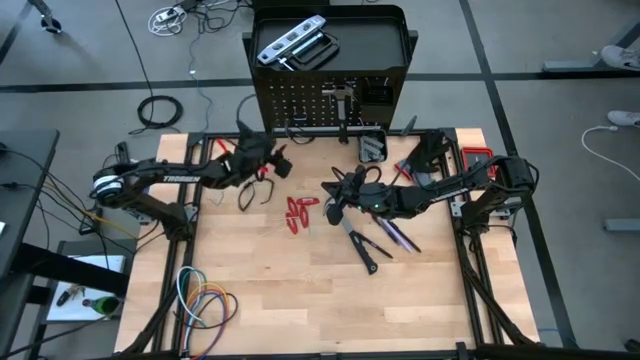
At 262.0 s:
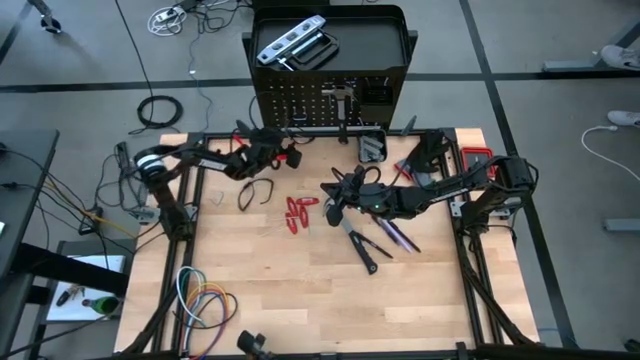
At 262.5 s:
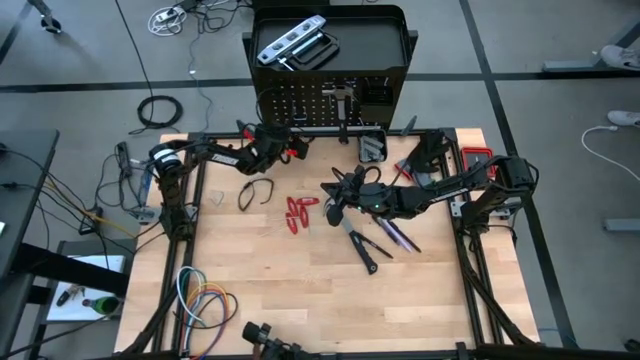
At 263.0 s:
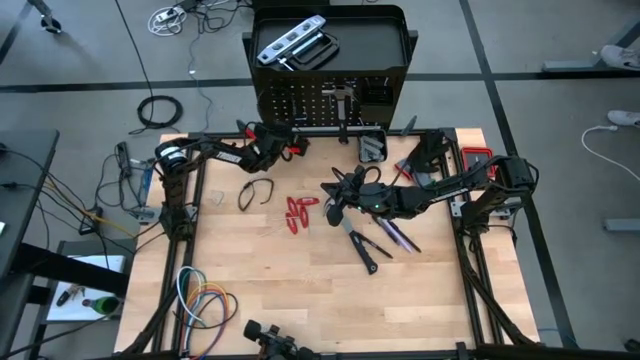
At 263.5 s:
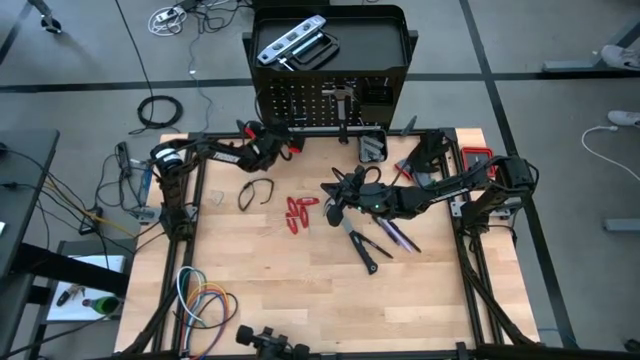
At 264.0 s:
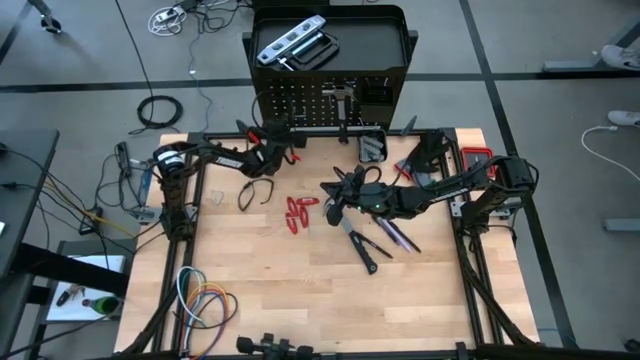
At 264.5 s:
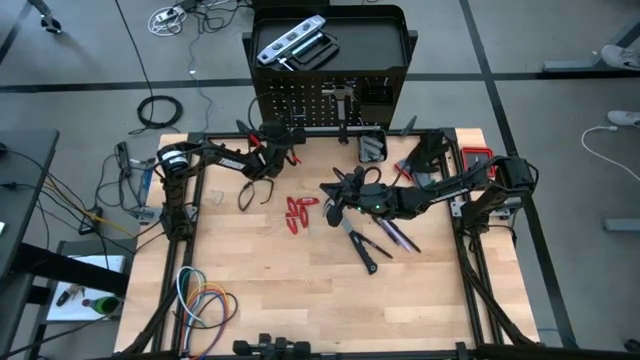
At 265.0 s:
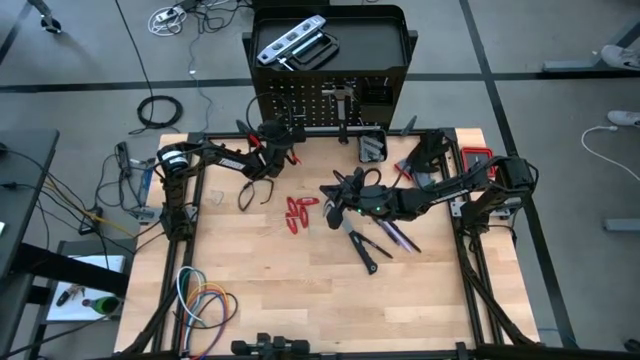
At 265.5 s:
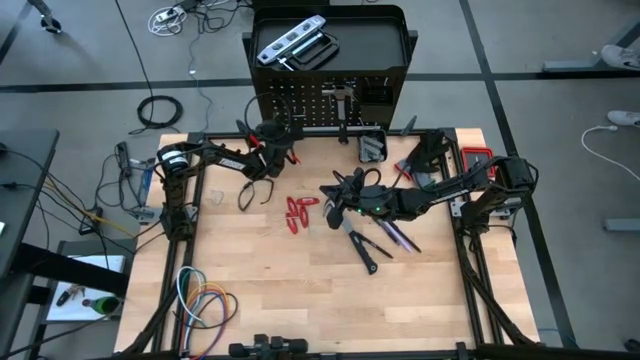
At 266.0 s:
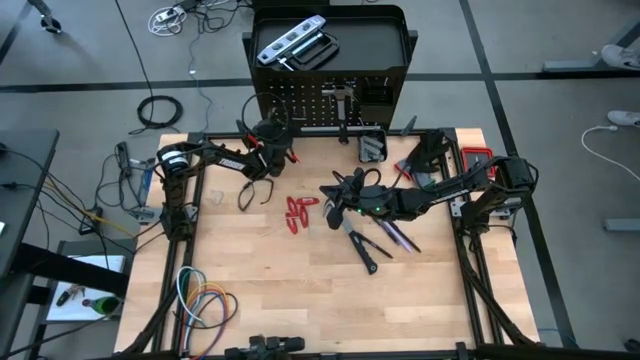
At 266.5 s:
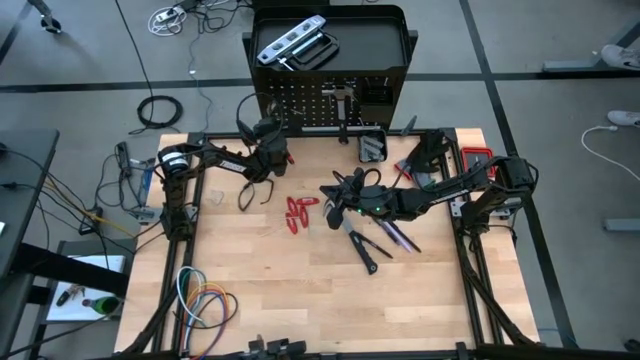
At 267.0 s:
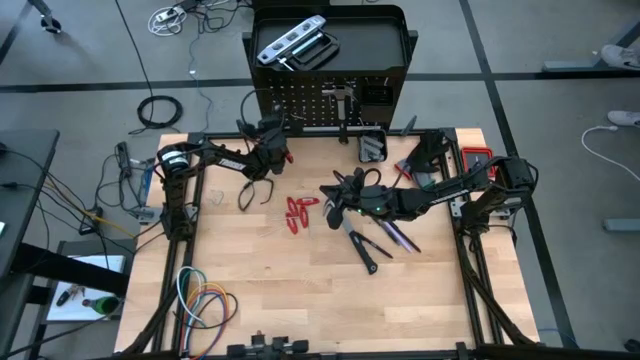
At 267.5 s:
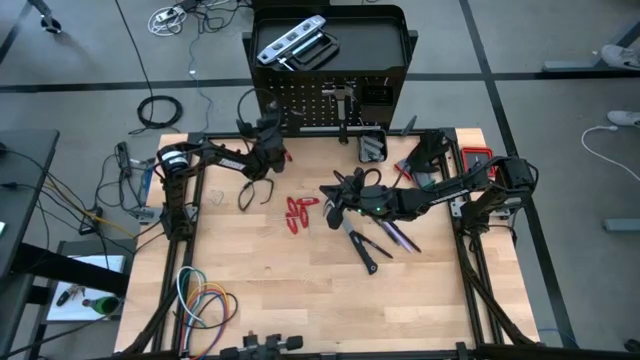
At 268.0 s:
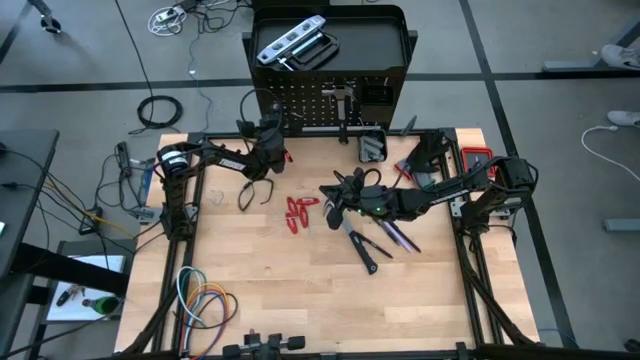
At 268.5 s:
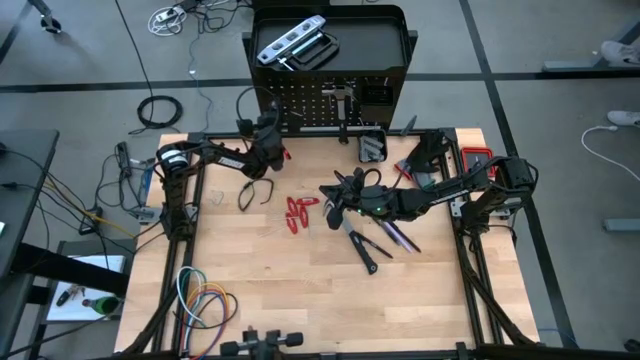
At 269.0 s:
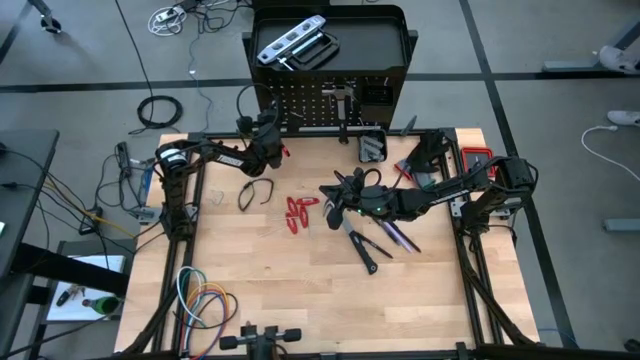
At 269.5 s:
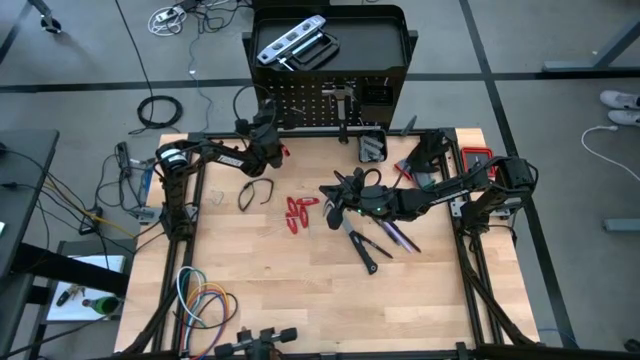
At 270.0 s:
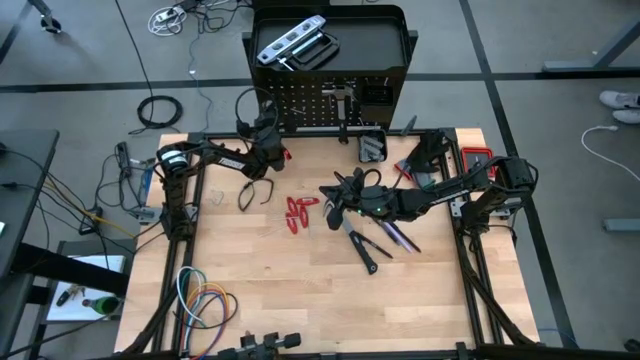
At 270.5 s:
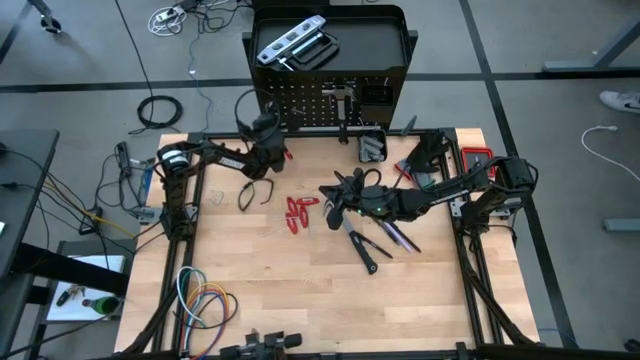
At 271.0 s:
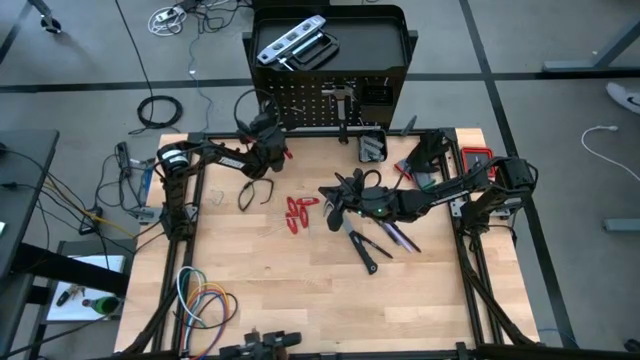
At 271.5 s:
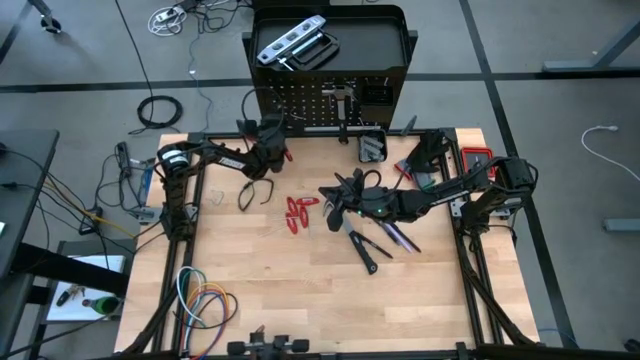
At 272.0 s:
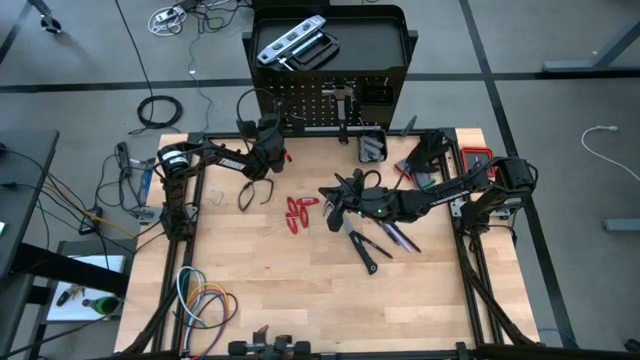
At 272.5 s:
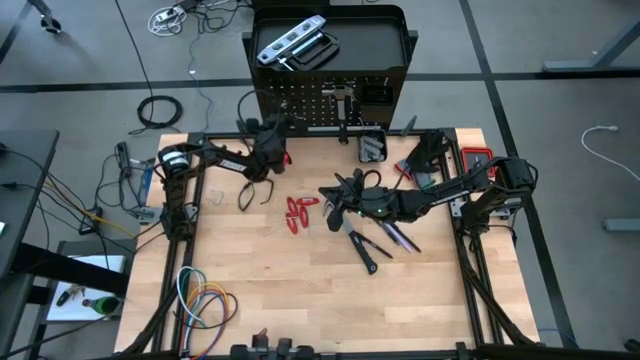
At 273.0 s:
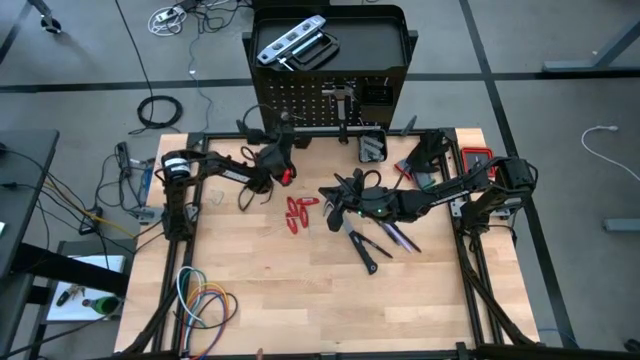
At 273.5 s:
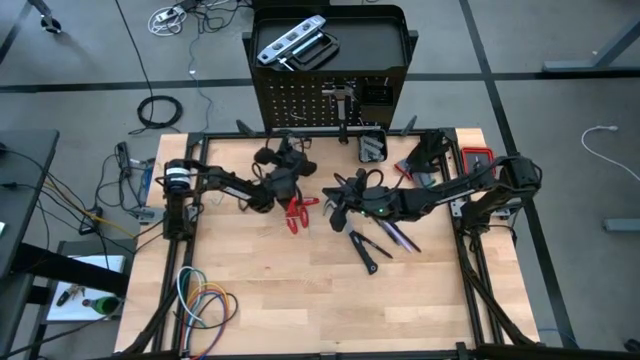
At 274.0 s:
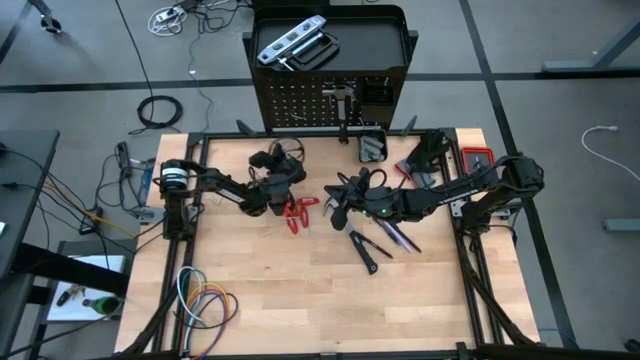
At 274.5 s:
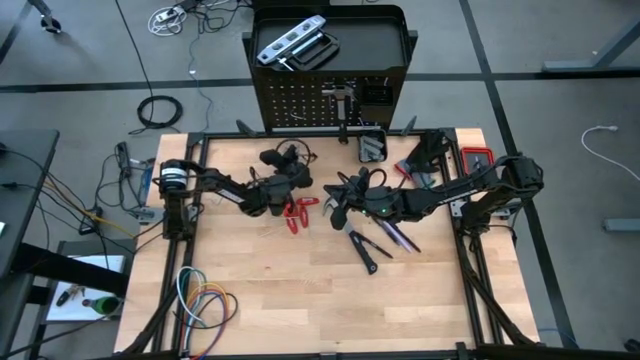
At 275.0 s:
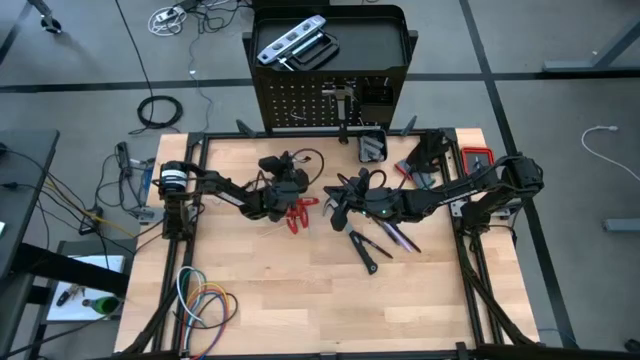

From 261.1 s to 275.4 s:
Task: Hang tools onto peg board
Remove the glasses from the peg board

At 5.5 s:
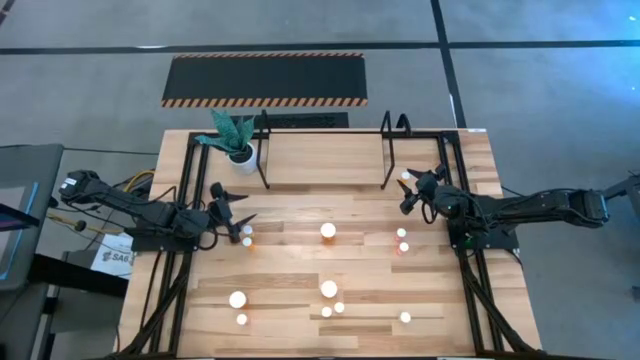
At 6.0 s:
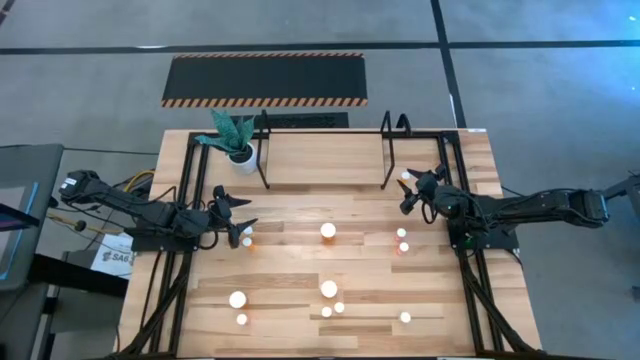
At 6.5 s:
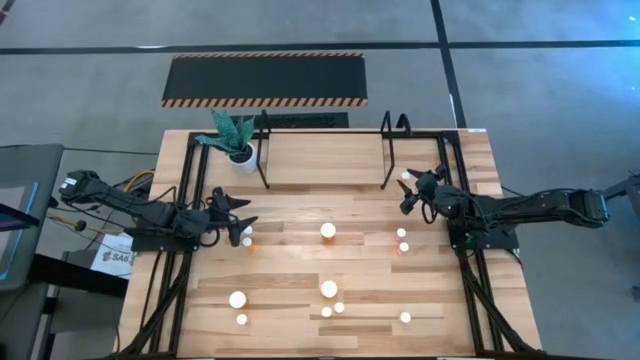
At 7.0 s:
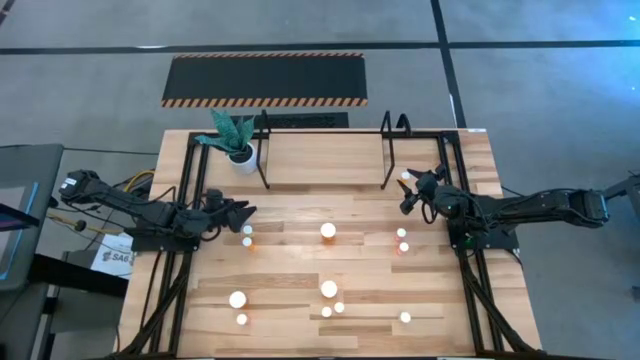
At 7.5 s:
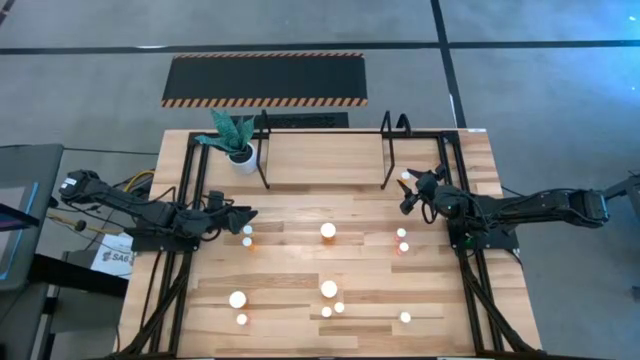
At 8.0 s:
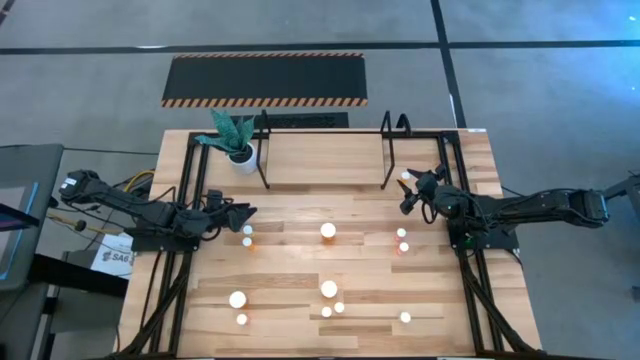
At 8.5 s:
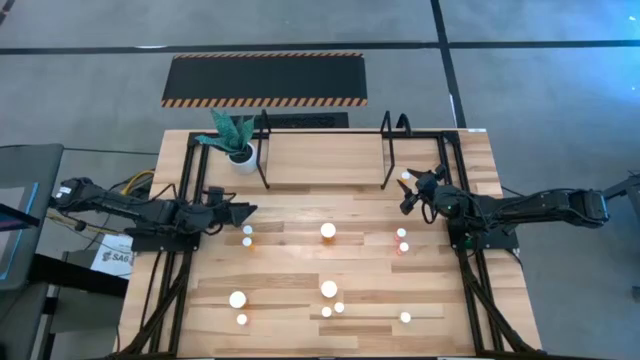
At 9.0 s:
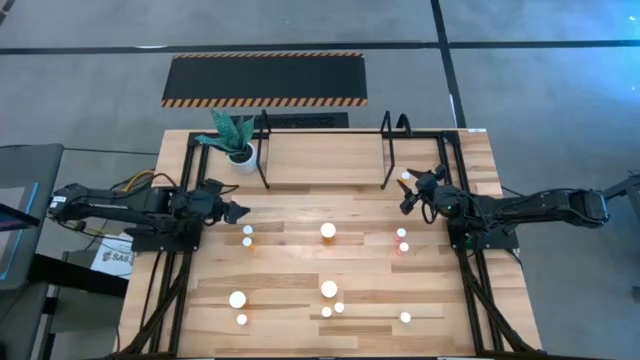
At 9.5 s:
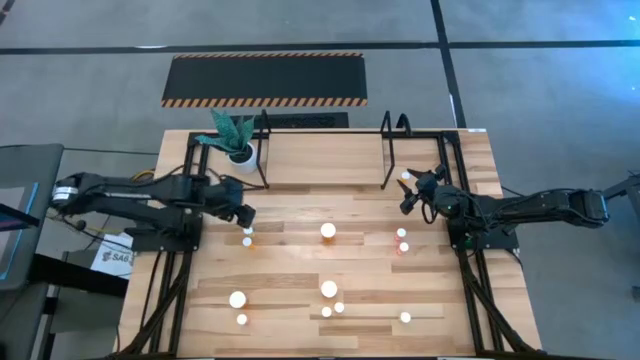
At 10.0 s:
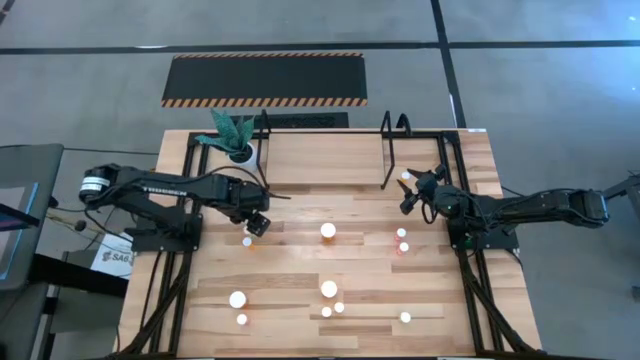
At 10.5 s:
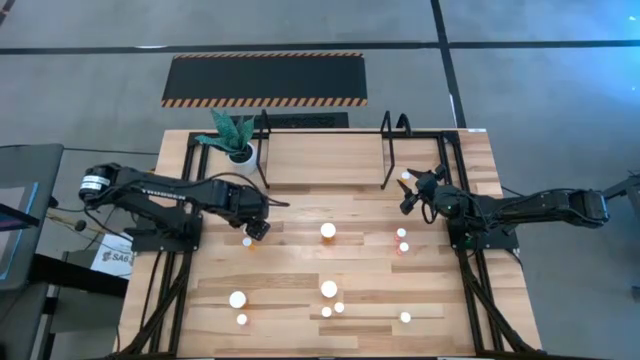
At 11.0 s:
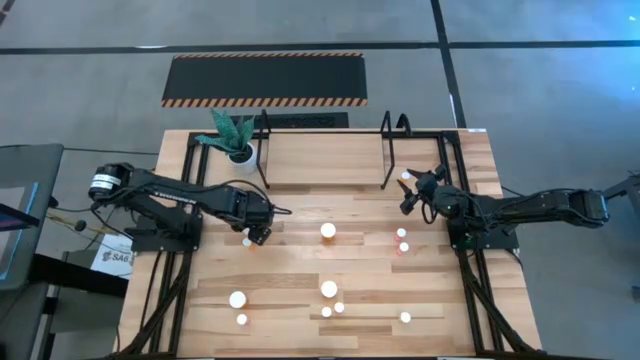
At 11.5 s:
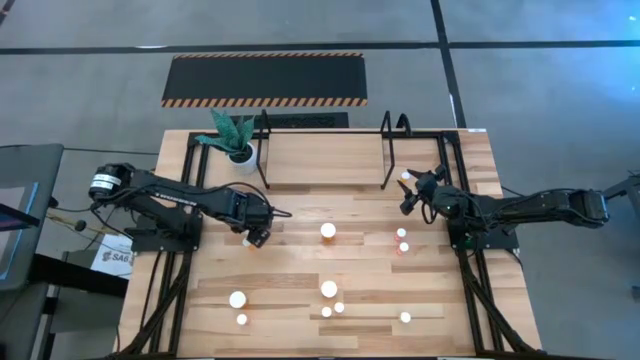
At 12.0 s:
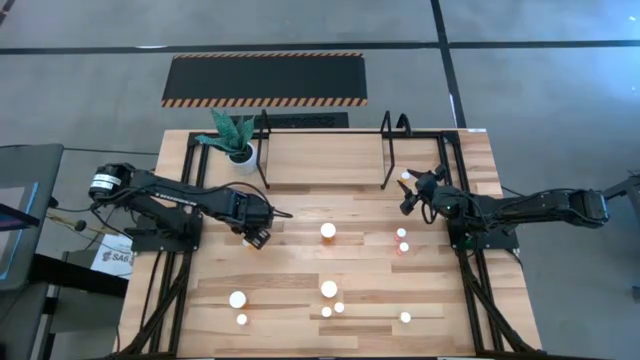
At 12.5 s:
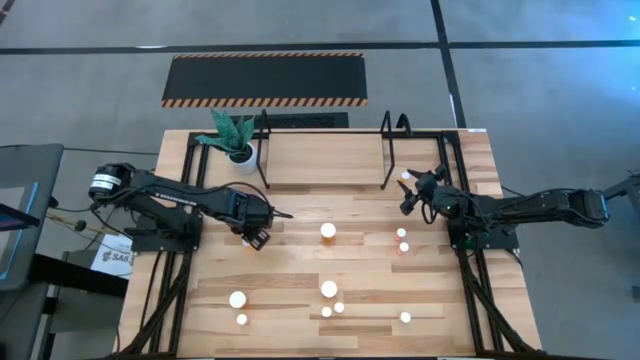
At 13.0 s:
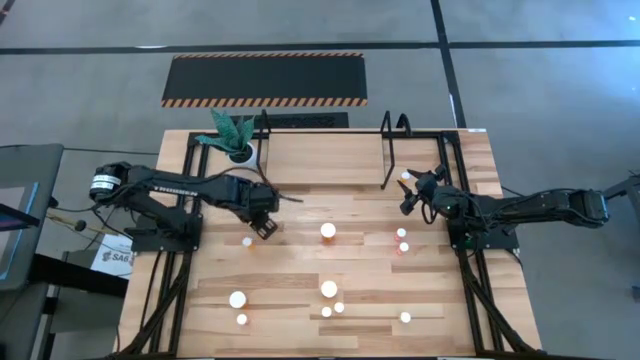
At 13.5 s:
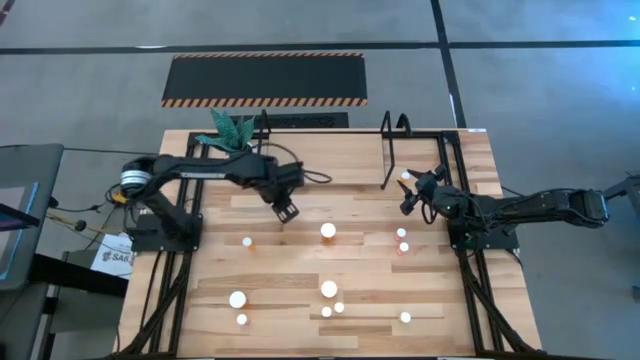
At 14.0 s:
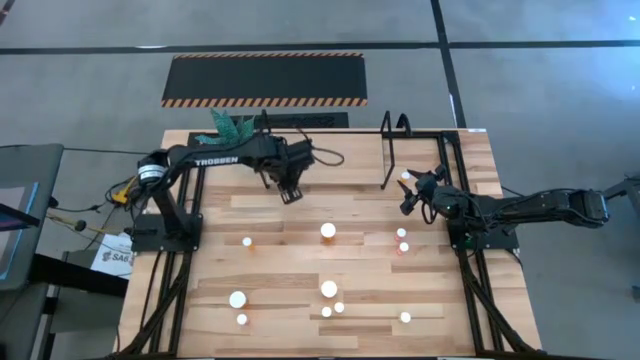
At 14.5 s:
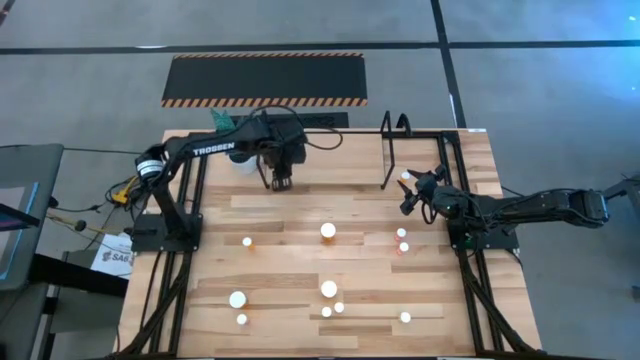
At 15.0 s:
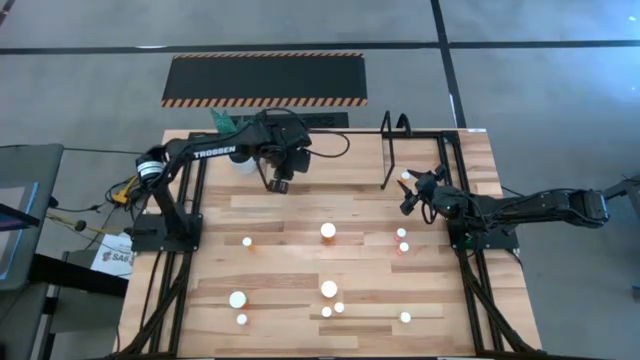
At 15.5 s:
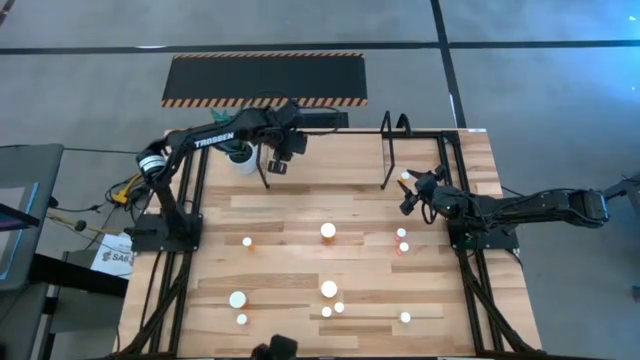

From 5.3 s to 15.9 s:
Task: Pick and place medicine bottles onto shelf by color
Put the top left yellow pill bottle on the shelf
